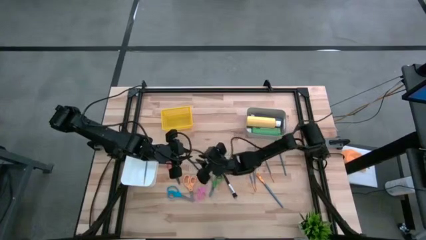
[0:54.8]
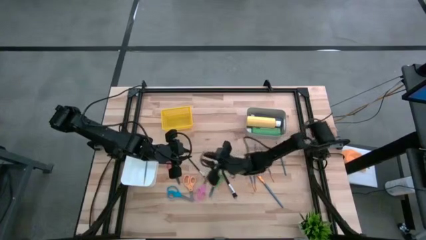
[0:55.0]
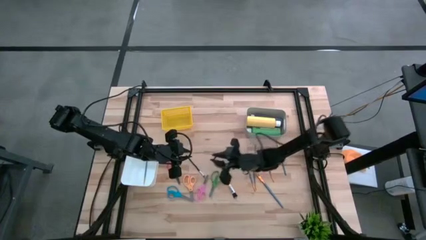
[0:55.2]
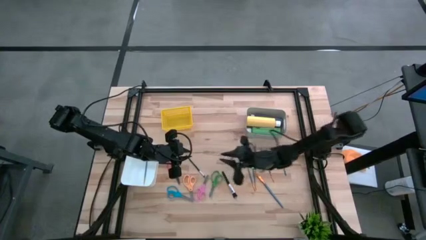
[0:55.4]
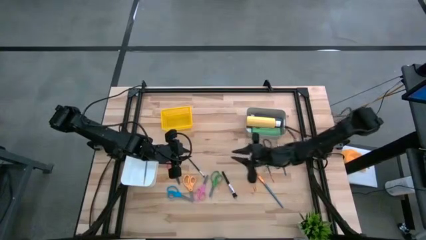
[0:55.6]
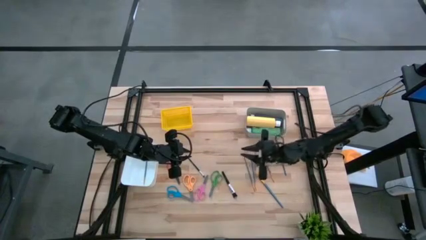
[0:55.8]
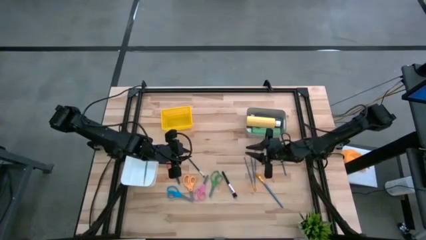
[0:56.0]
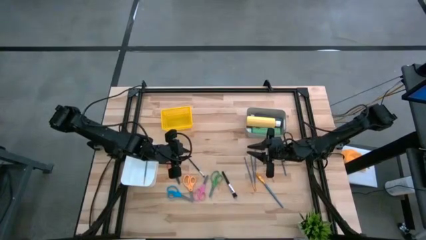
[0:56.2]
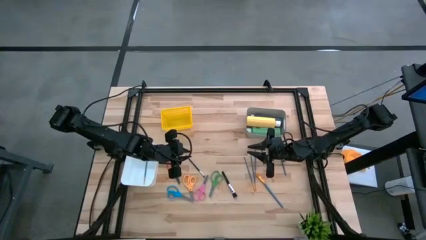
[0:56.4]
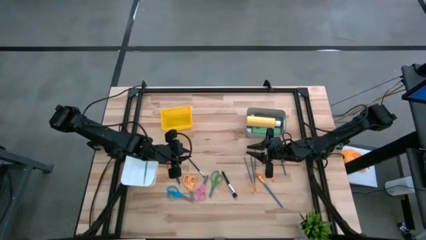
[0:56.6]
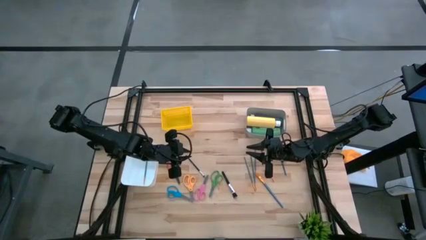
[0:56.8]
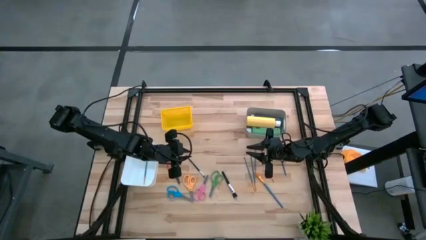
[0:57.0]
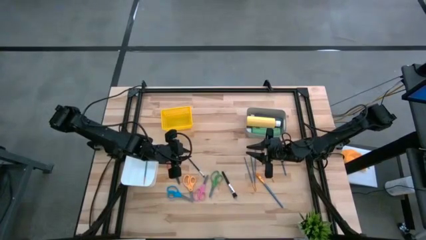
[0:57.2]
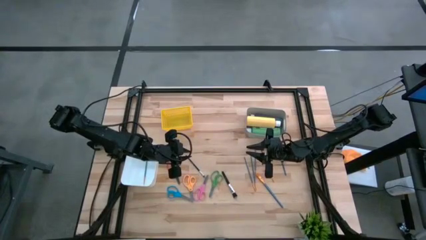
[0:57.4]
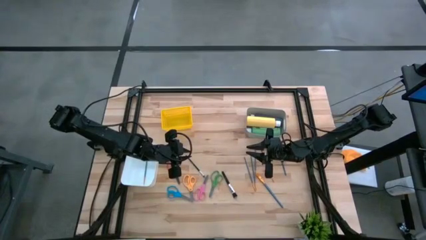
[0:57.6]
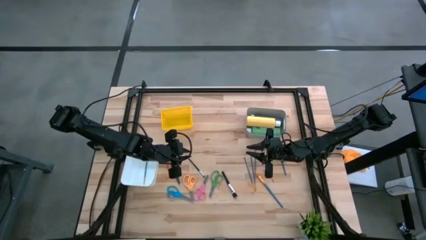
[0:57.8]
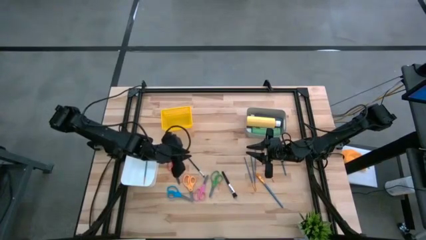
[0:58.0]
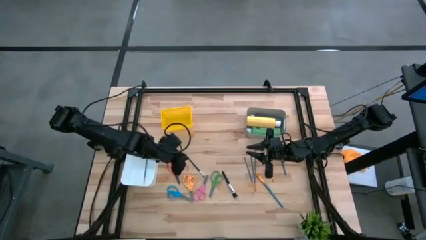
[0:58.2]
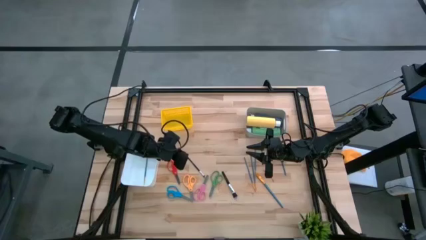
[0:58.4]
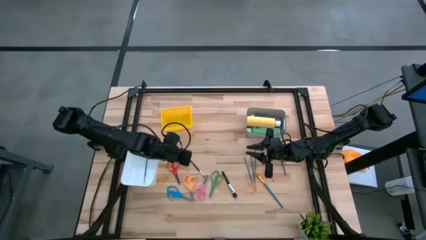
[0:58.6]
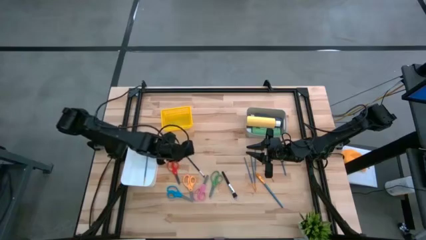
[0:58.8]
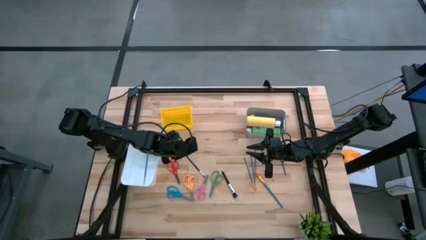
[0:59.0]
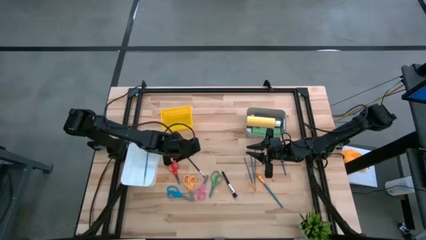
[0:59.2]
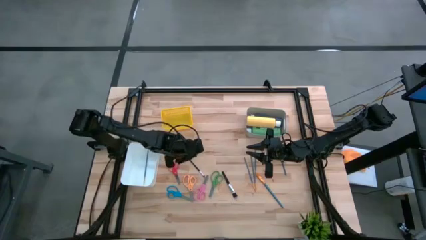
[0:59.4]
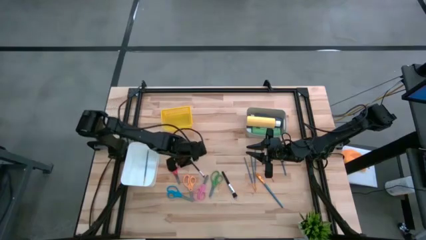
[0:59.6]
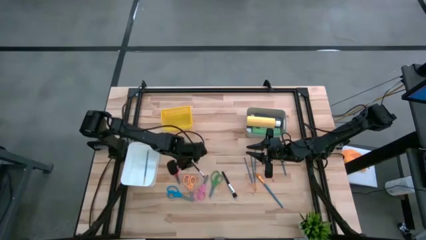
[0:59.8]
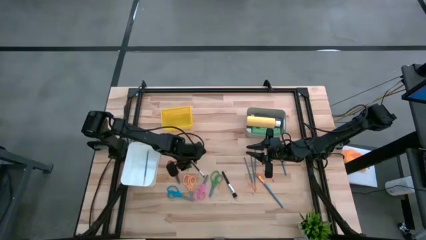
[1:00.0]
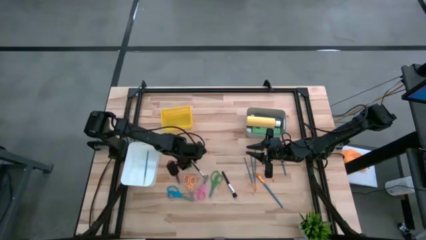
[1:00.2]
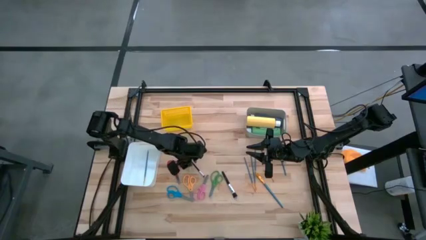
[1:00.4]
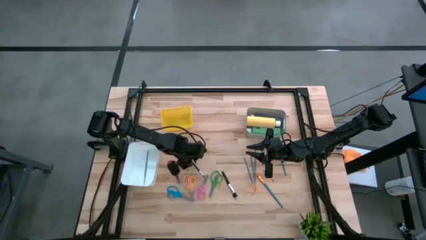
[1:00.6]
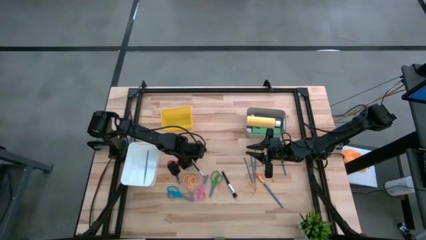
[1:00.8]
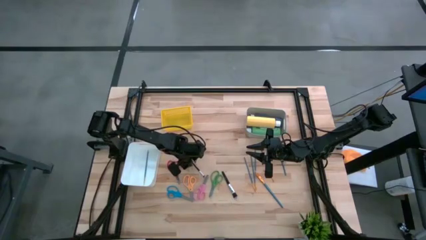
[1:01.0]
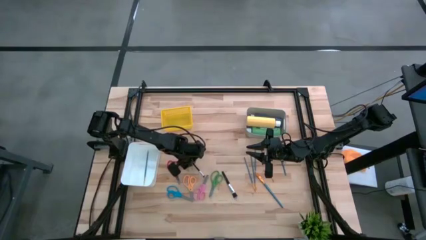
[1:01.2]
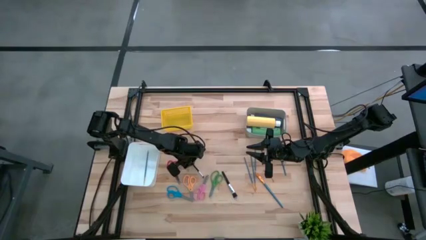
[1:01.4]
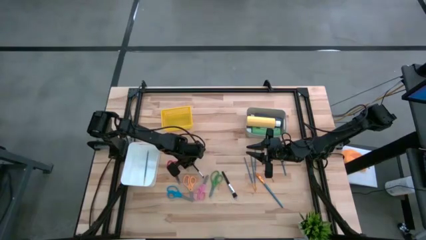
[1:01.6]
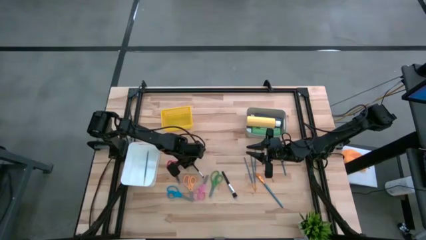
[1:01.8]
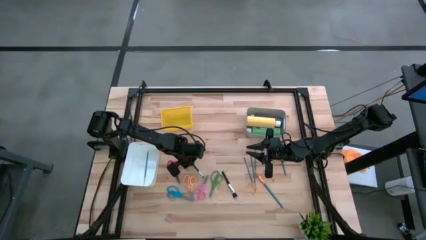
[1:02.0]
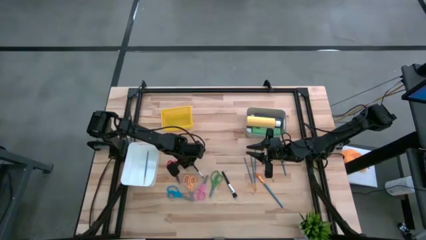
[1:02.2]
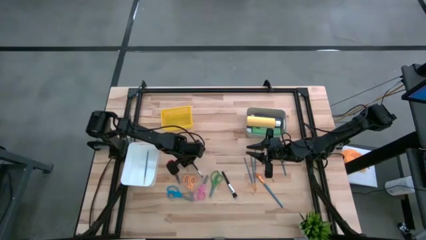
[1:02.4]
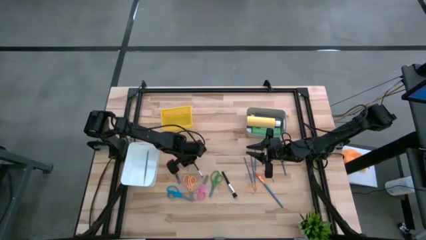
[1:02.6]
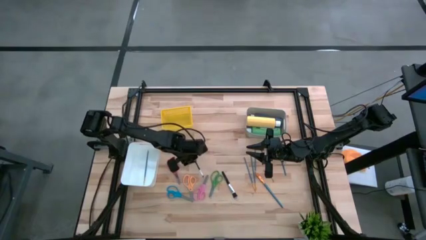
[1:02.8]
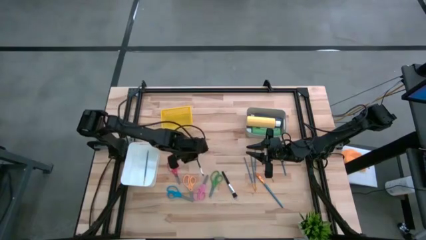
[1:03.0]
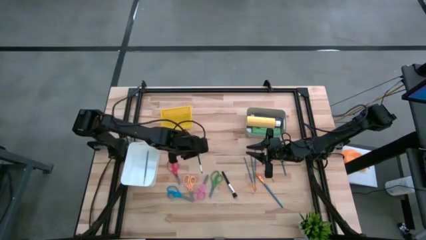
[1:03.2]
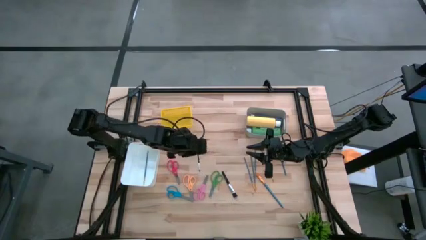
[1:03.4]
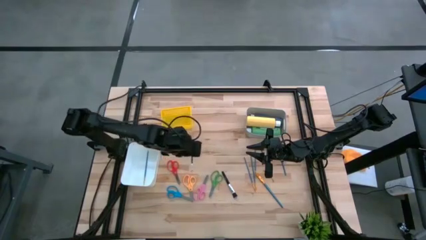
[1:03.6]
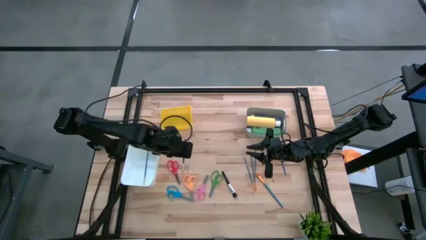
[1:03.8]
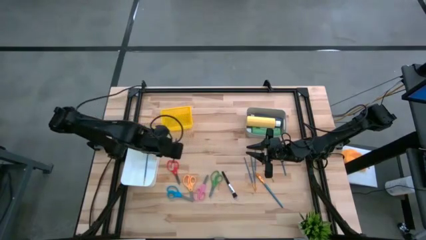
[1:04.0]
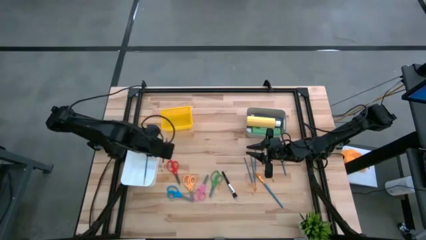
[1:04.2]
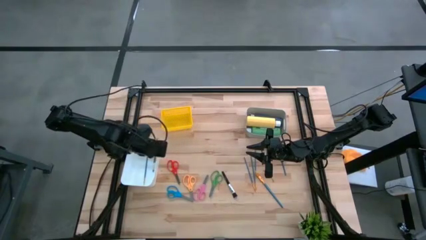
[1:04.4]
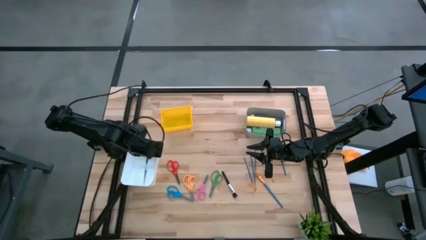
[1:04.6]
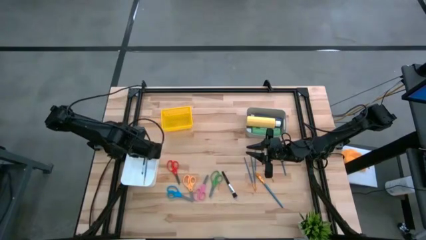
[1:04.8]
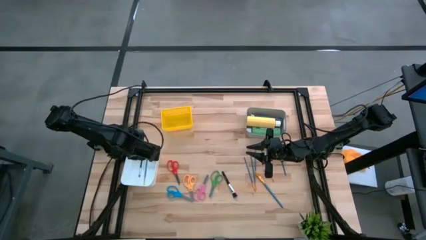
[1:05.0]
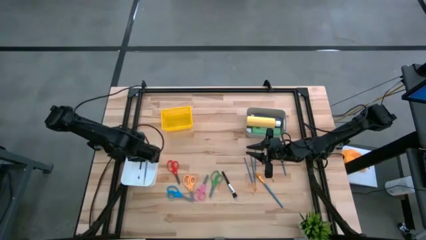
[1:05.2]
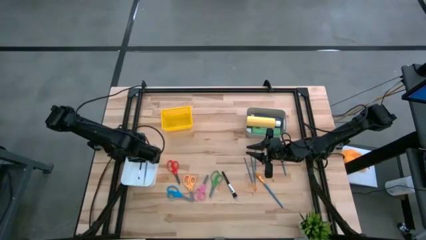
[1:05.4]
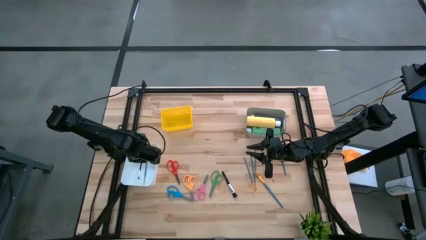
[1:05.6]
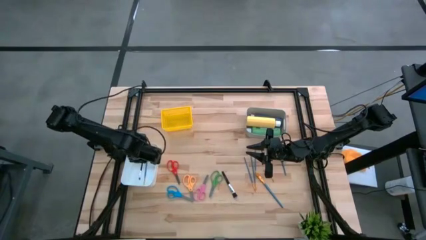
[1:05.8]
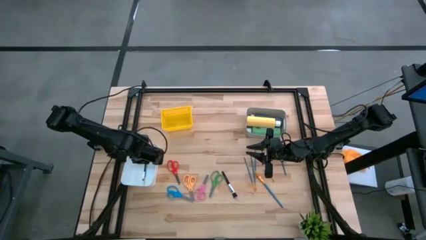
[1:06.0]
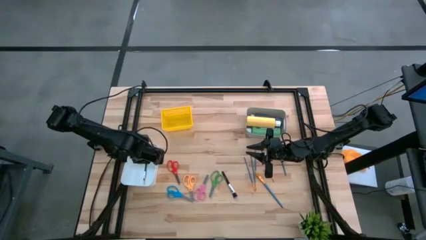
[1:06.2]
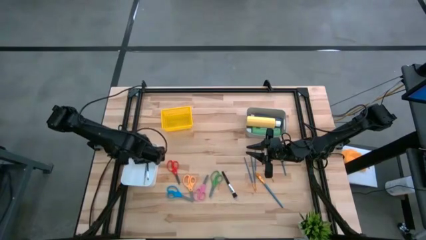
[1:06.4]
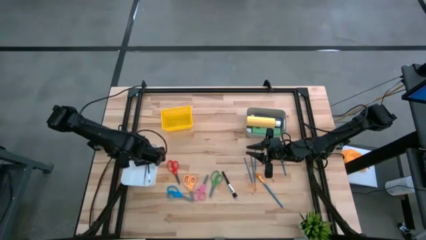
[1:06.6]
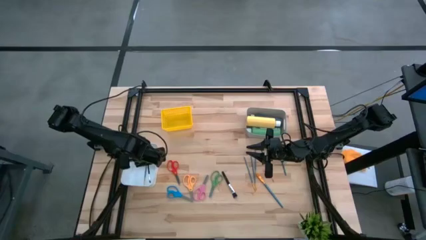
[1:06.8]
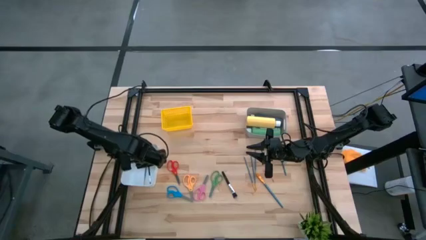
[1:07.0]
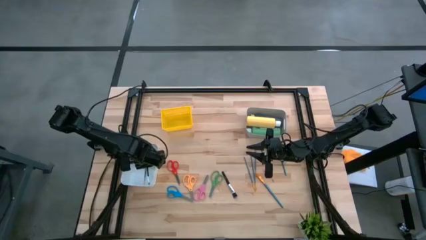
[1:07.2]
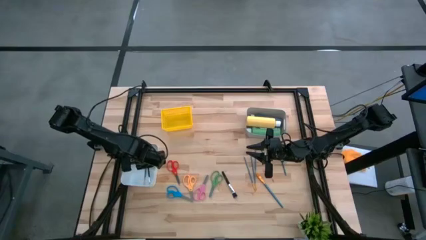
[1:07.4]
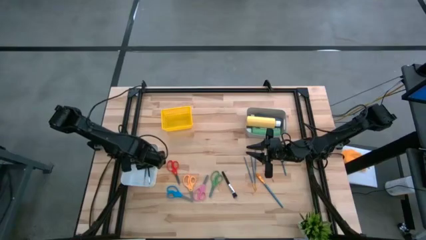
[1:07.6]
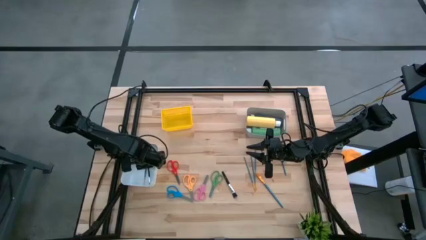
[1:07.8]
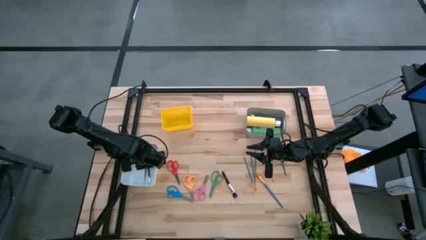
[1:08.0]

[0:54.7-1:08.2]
Task: Pick & Place Paint Supplies
Put the black eyeshadow brush into the white bin
